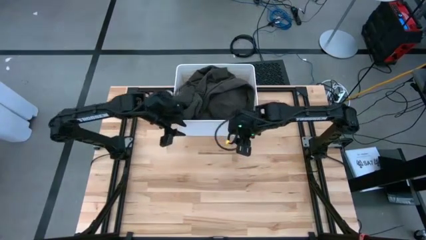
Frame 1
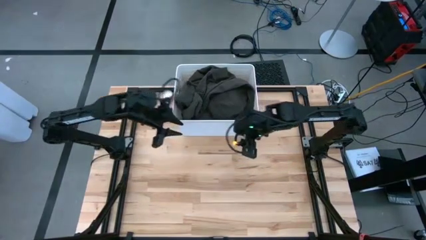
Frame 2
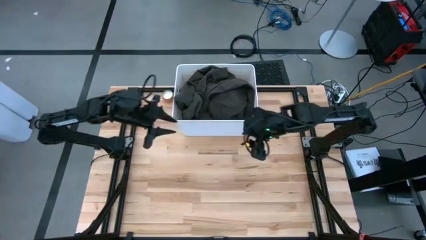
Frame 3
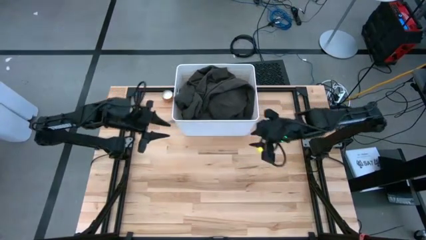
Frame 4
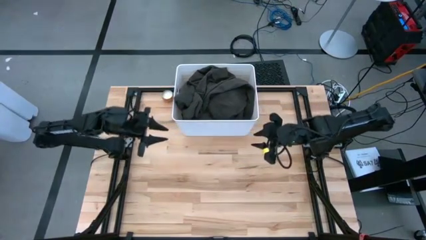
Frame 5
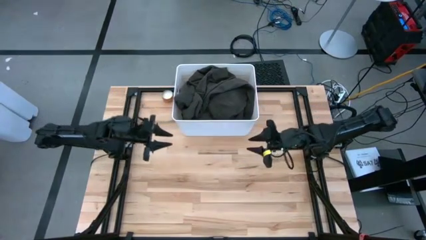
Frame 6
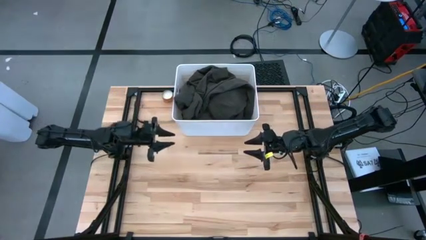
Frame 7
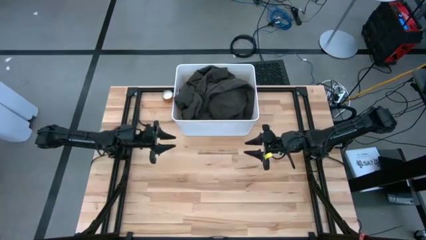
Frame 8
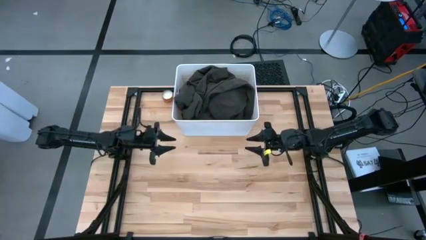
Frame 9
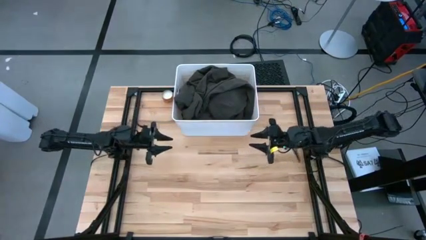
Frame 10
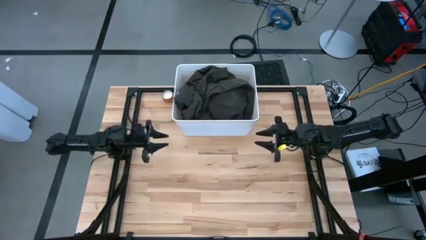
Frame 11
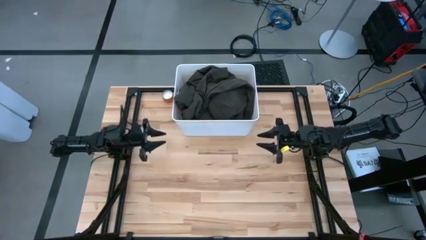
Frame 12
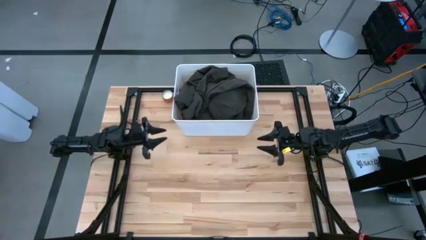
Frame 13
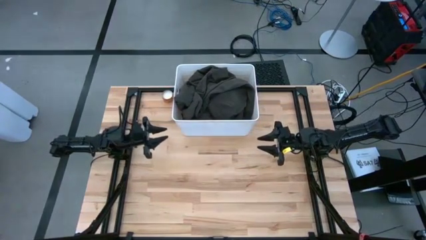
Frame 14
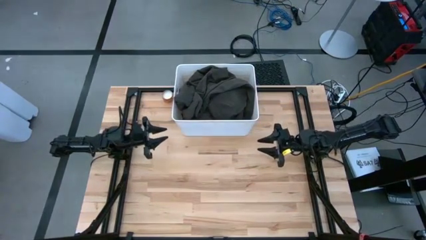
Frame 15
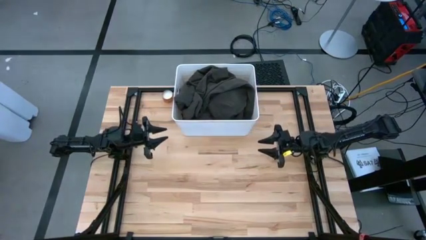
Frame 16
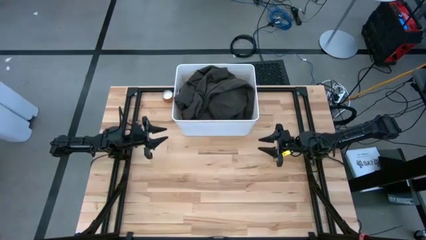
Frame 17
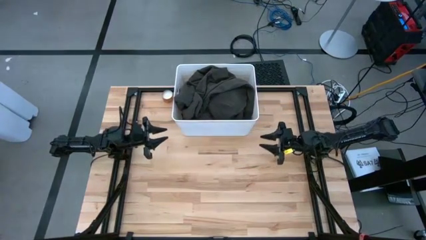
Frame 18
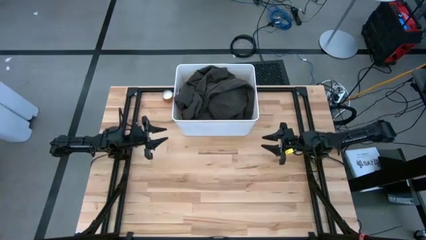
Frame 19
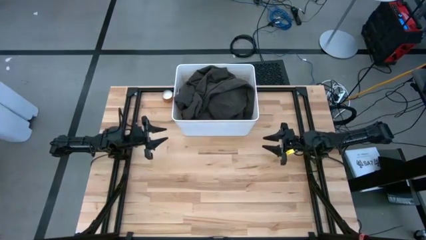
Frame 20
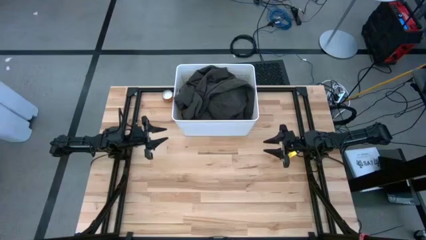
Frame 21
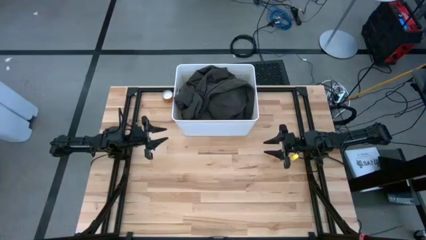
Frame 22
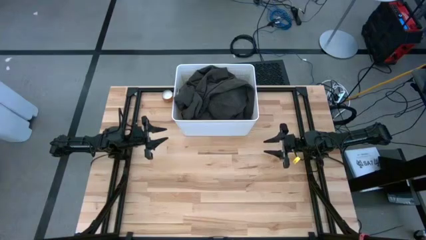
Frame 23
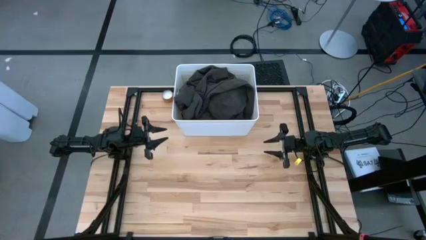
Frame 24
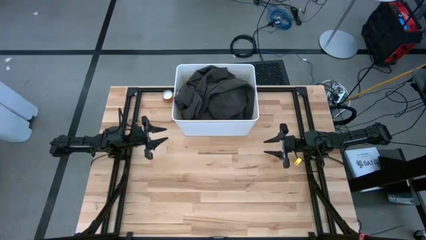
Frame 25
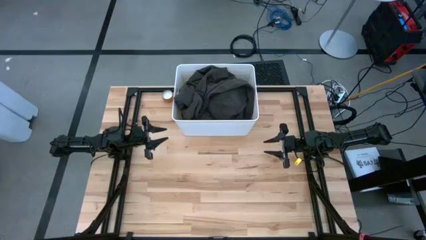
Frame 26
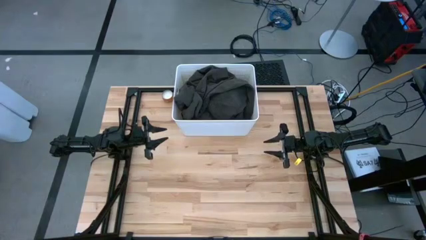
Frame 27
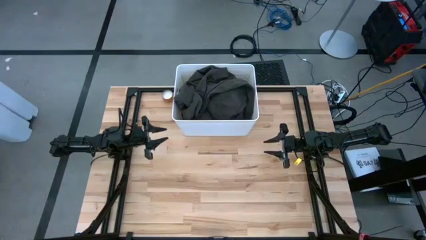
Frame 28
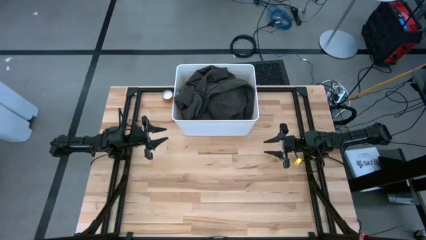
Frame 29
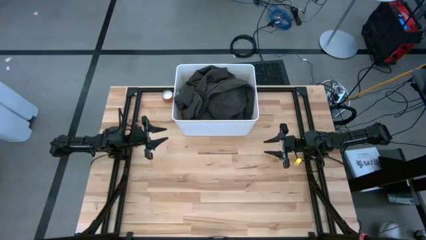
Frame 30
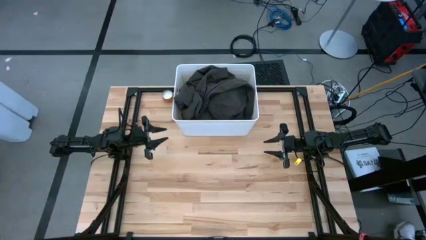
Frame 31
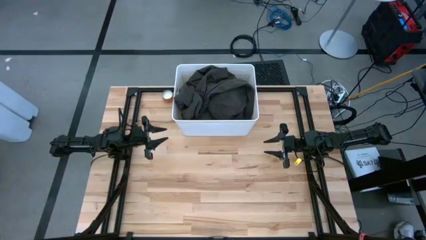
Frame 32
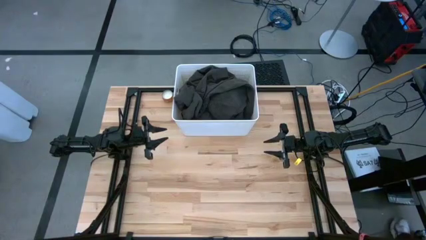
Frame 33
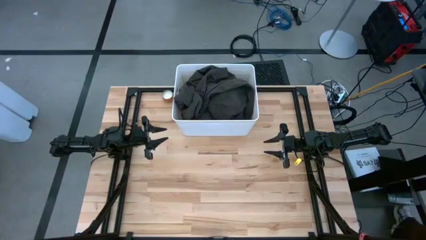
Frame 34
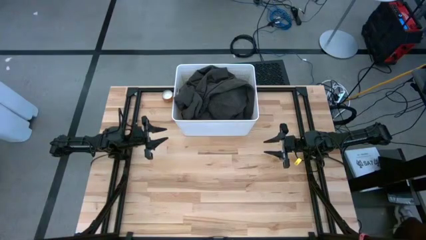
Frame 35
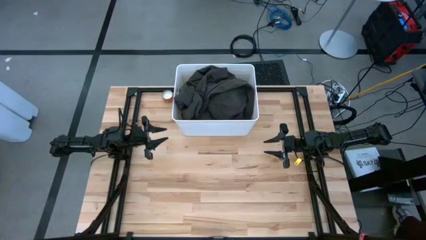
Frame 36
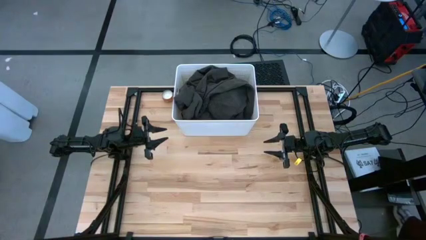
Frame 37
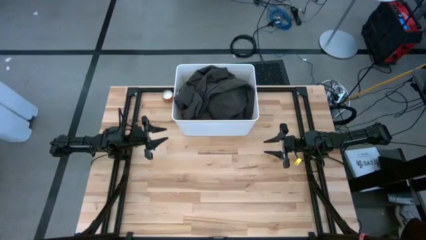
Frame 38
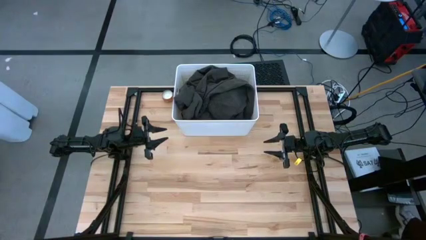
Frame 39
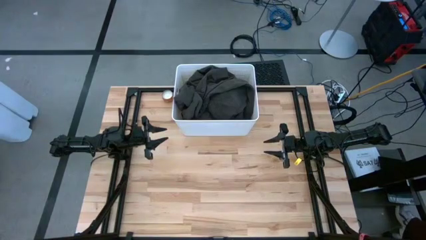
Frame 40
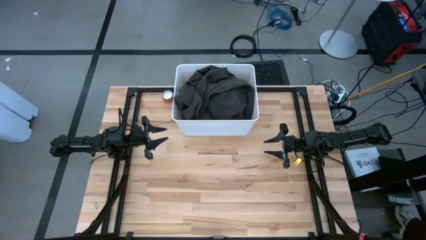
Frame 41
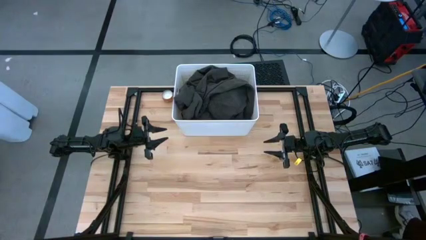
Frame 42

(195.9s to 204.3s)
Task: Sort clothes
Return to Home Position

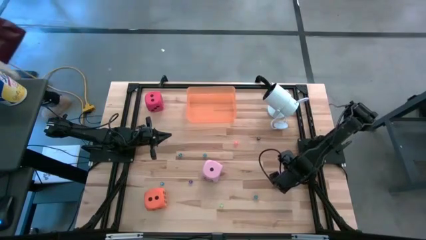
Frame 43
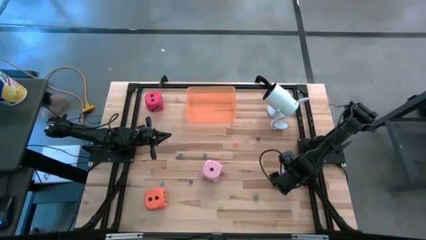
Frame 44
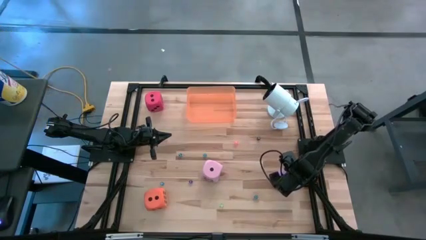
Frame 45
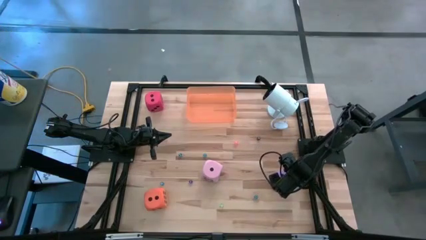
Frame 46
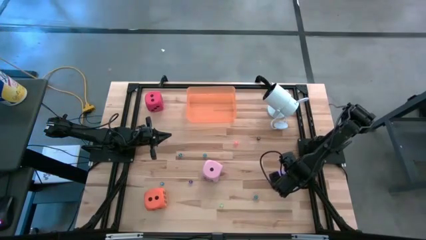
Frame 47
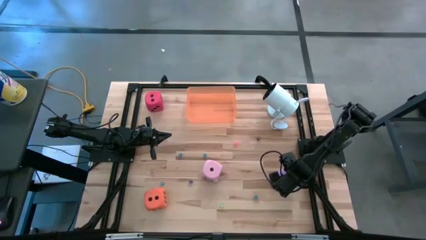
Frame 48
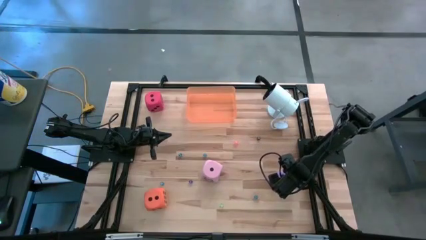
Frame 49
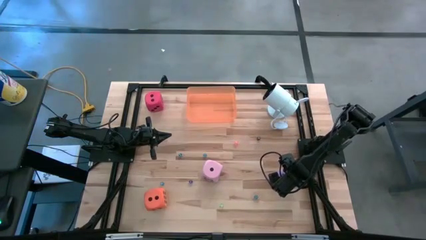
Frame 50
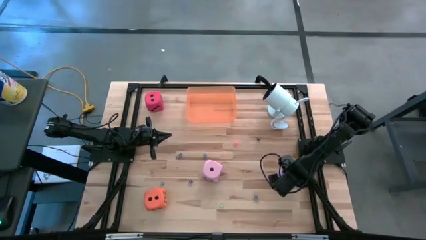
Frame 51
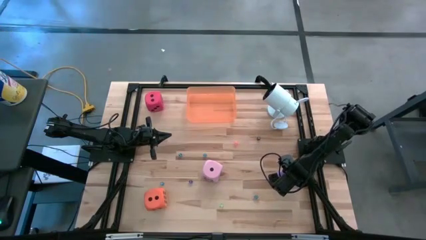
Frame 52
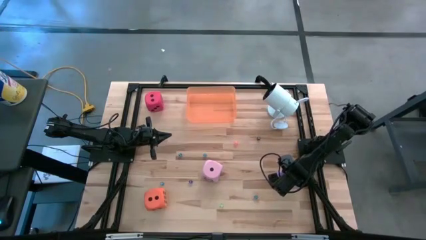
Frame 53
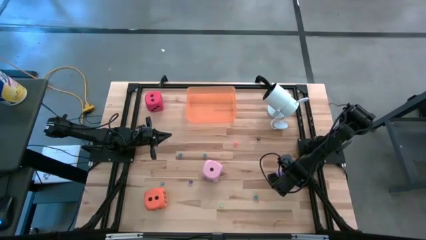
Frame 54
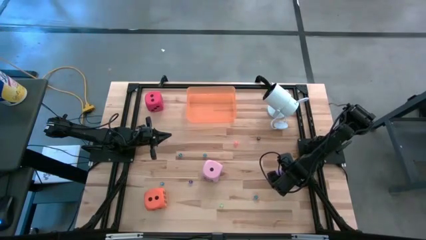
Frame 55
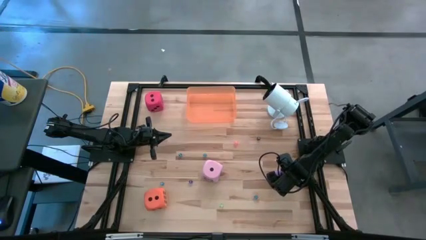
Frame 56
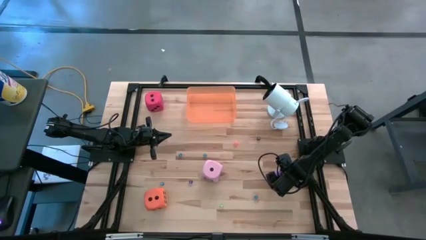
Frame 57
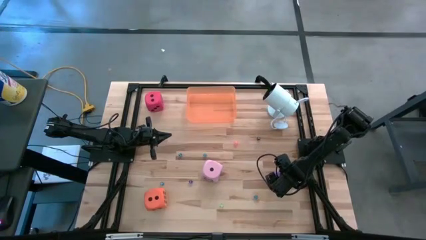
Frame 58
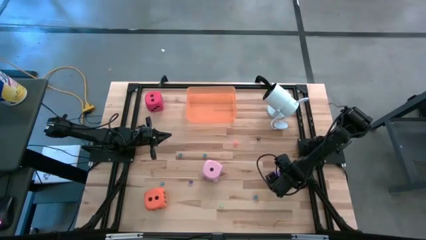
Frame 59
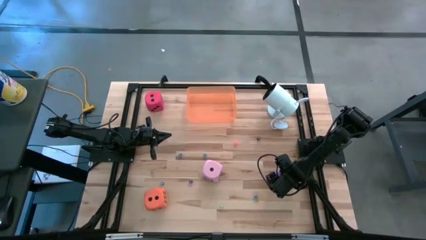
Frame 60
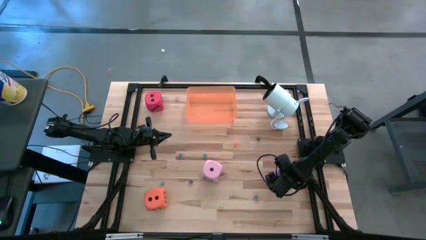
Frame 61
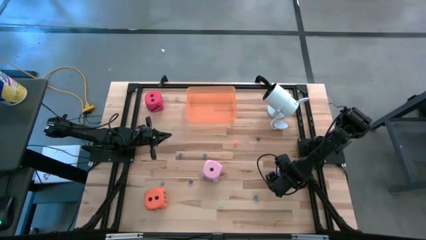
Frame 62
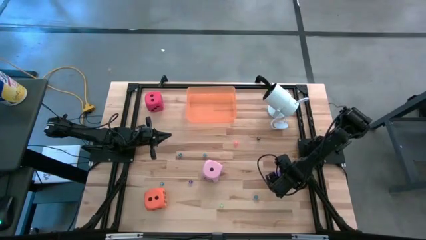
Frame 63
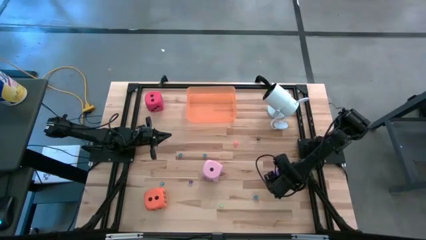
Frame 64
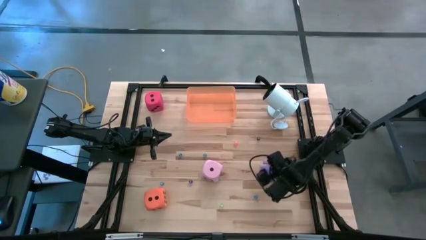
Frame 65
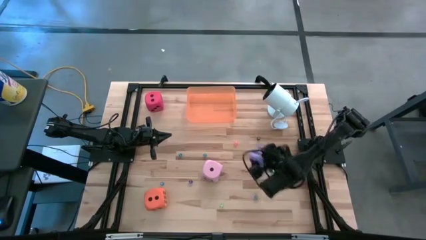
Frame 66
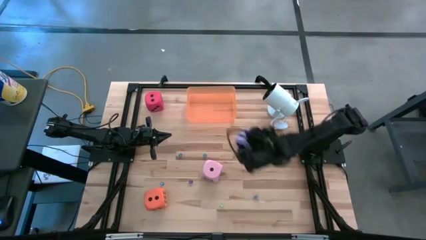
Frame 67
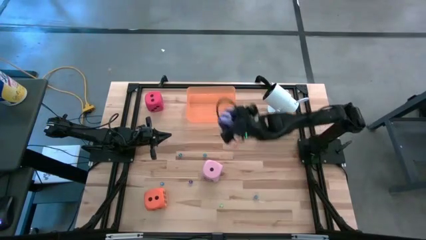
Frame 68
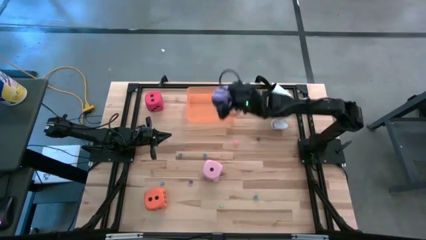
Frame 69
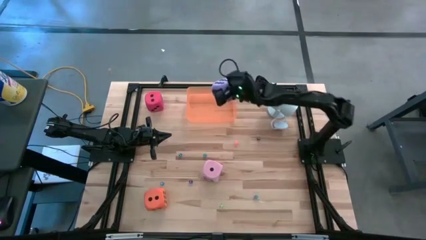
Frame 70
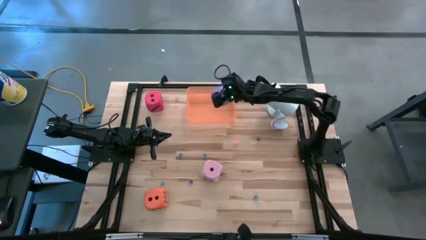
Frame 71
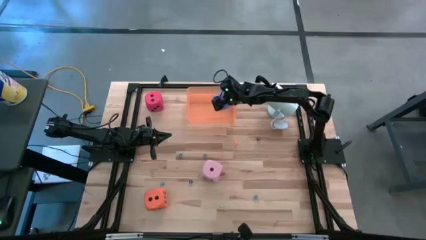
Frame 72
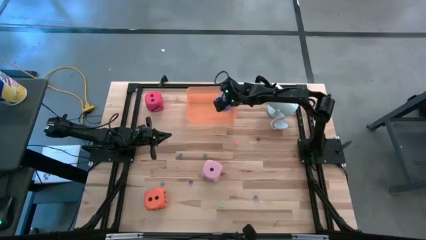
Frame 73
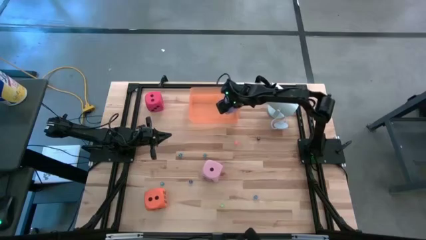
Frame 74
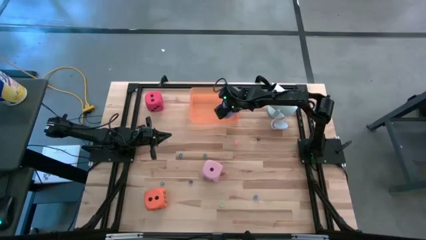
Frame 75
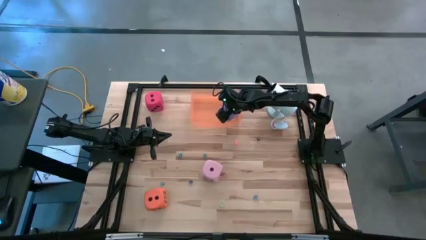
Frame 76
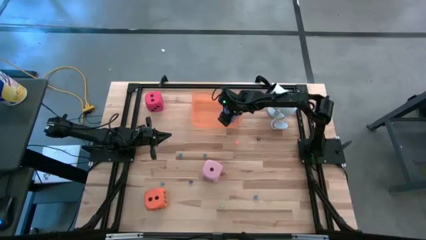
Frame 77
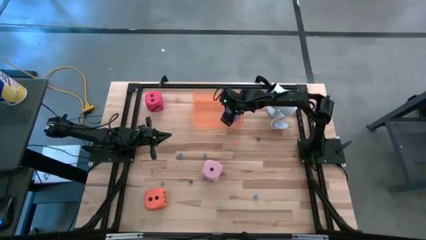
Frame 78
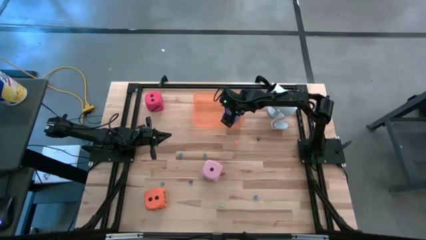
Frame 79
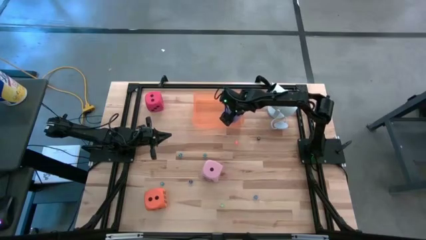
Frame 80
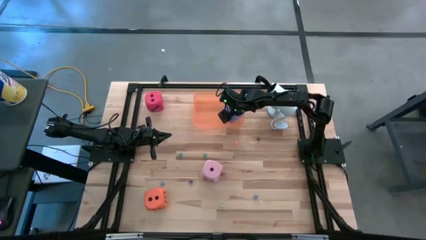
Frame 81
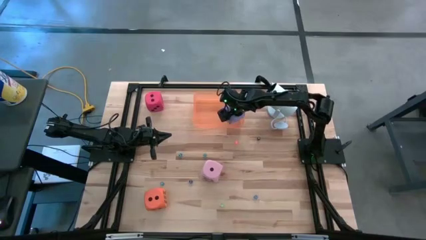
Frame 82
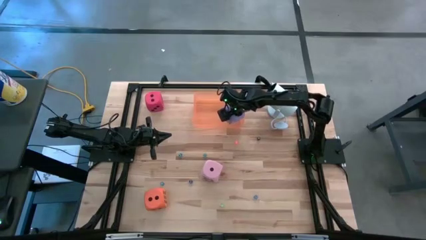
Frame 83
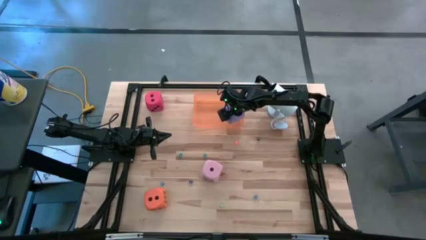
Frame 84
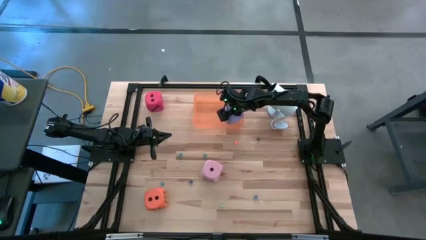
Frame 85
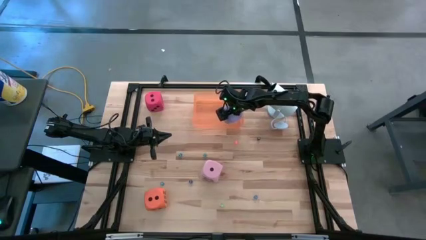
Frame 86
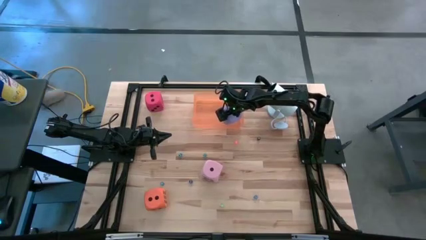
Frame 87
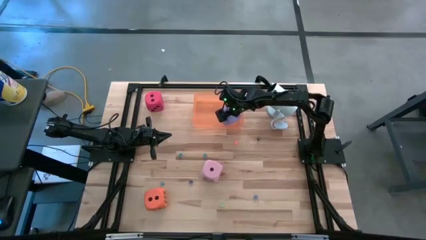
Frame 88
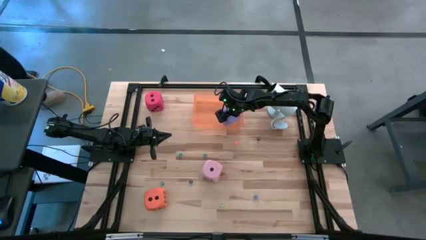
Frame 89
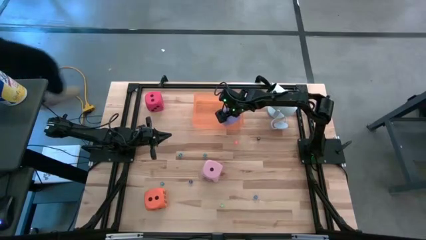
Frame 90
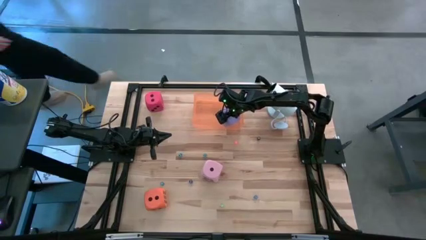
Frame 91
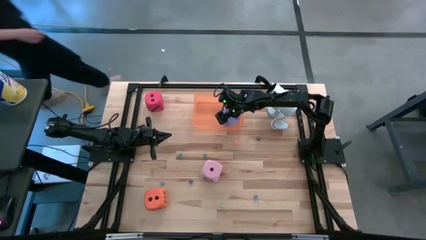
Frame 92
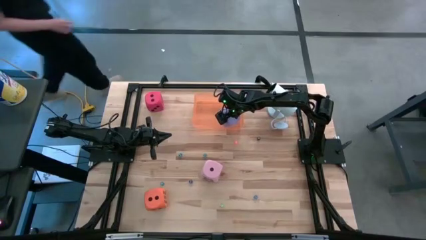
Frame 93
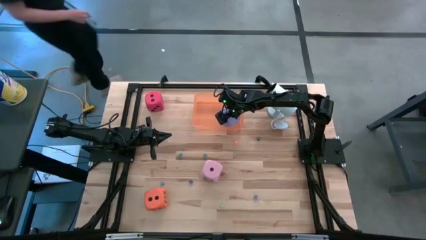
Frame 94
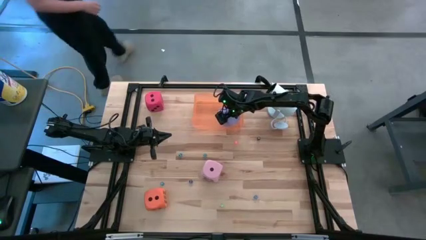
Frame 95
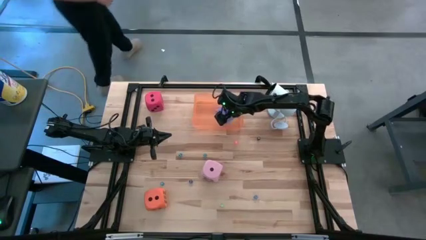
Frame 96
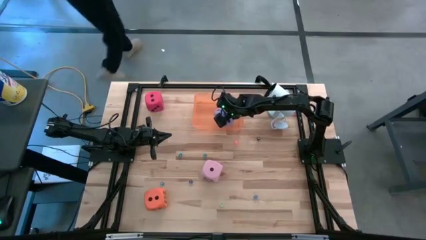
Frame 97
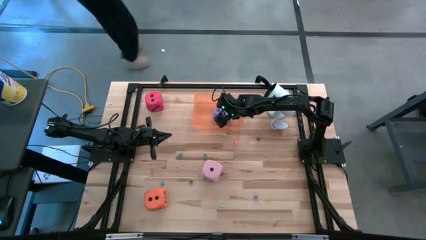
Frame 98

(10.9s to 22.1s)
Task: Pick & Place Dice
Put the large purple die into the orange bin
